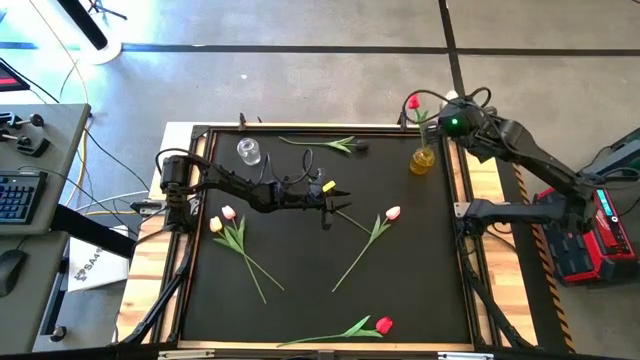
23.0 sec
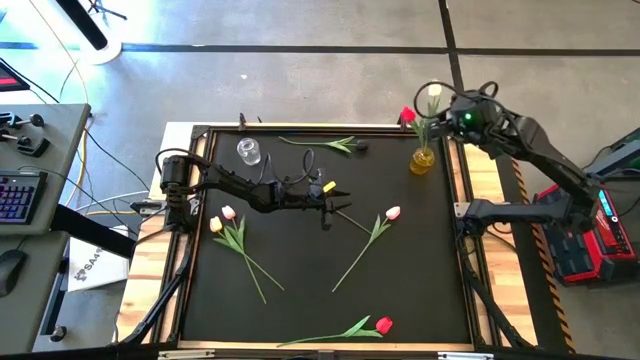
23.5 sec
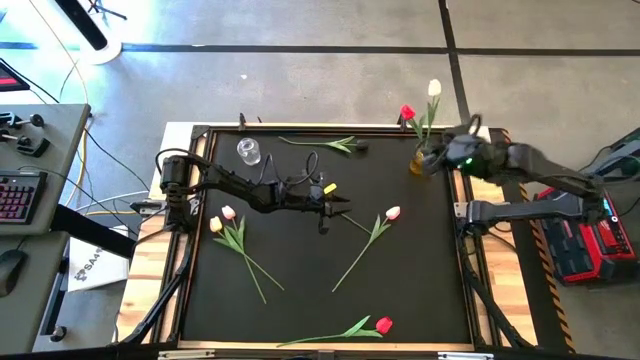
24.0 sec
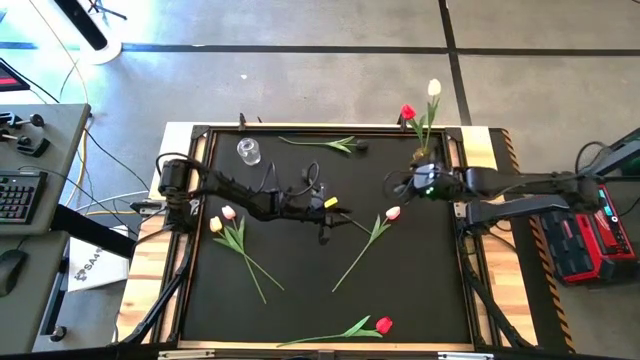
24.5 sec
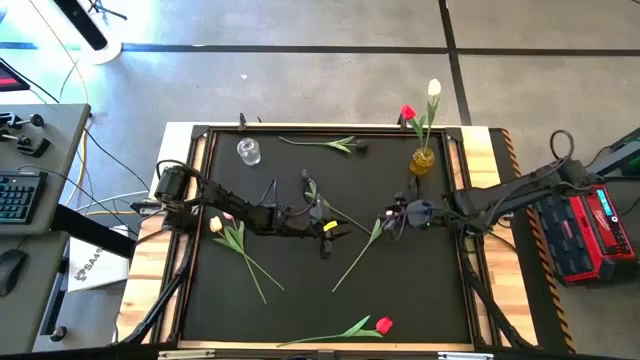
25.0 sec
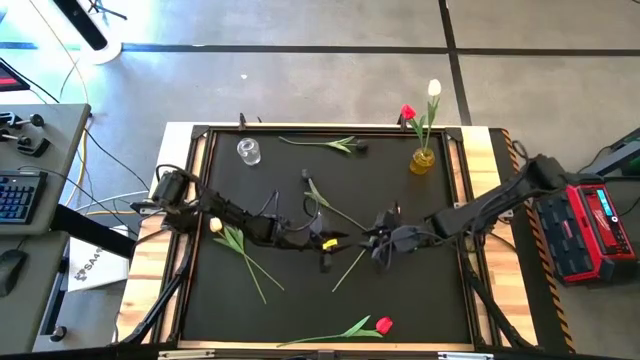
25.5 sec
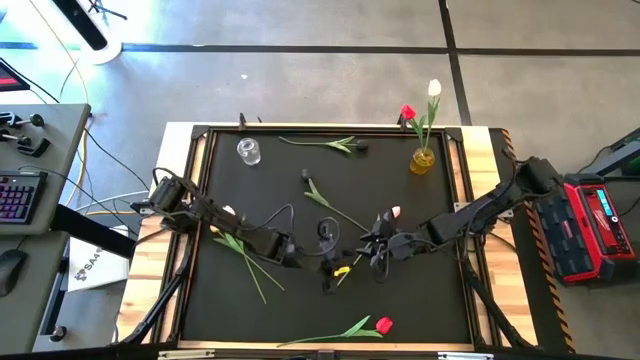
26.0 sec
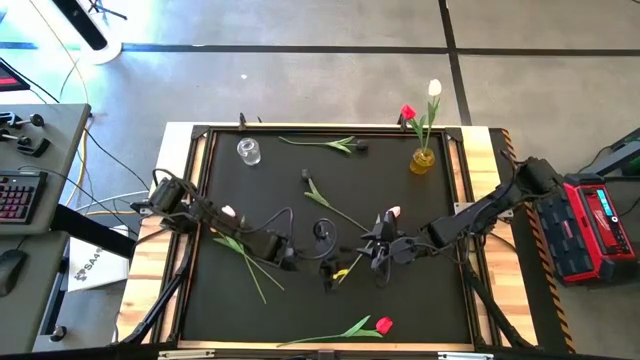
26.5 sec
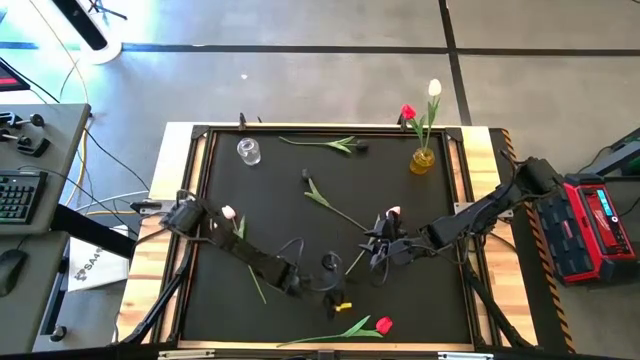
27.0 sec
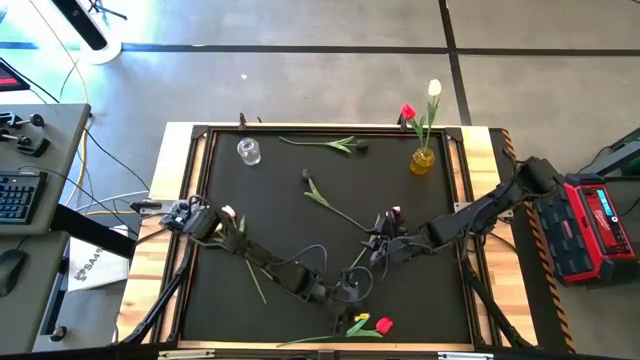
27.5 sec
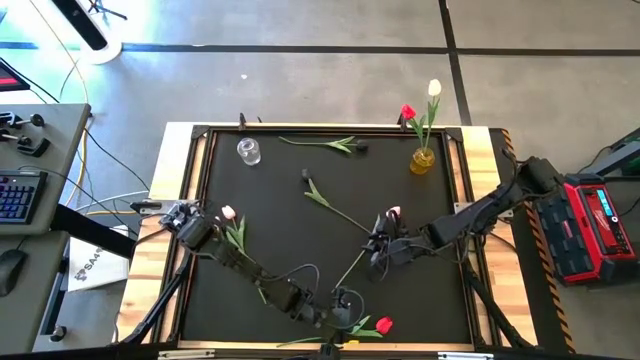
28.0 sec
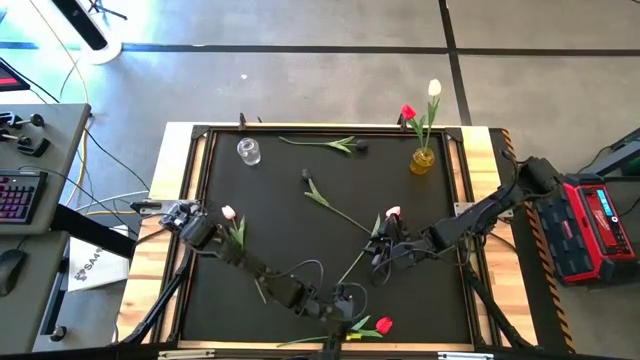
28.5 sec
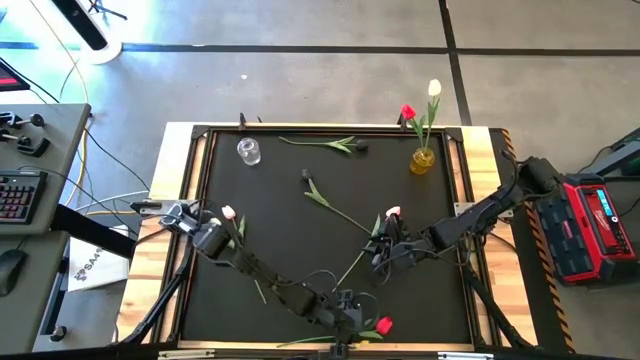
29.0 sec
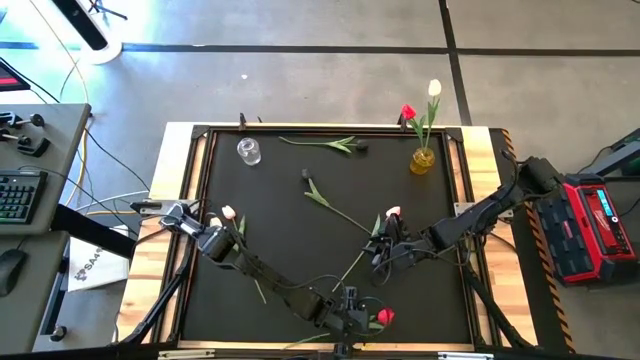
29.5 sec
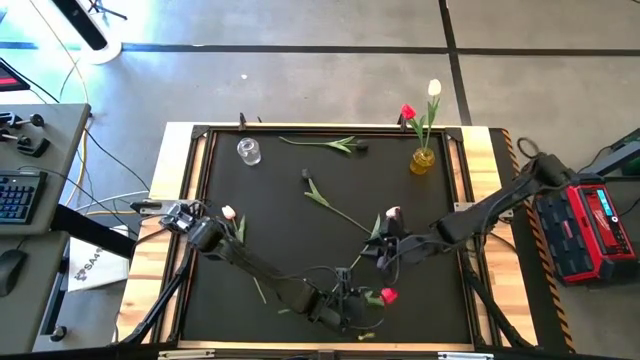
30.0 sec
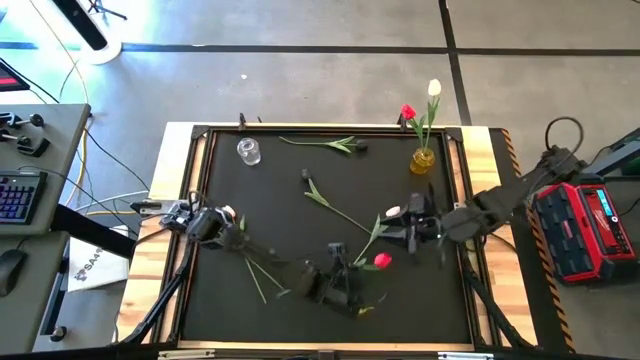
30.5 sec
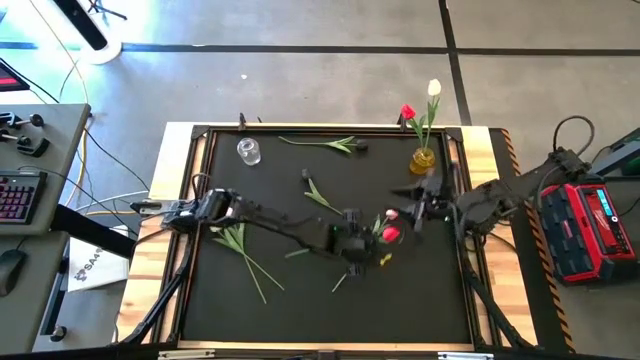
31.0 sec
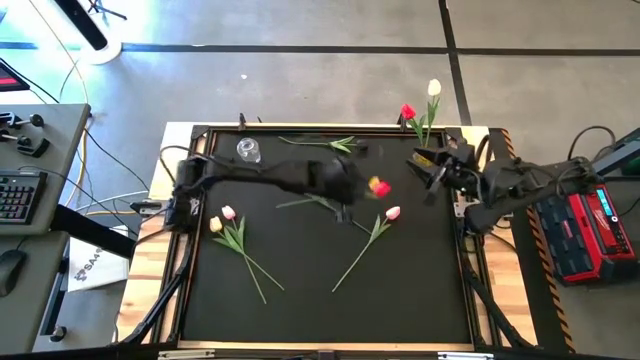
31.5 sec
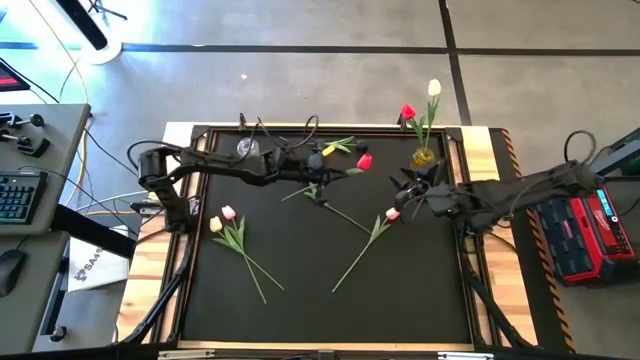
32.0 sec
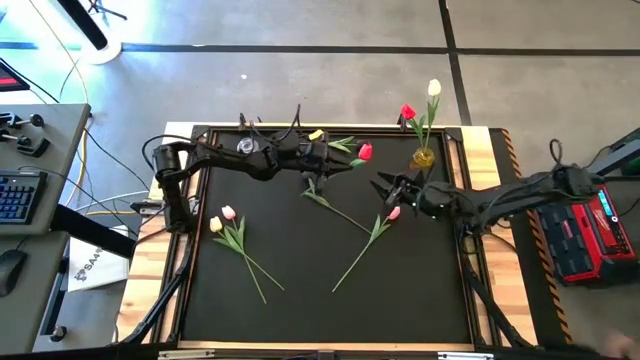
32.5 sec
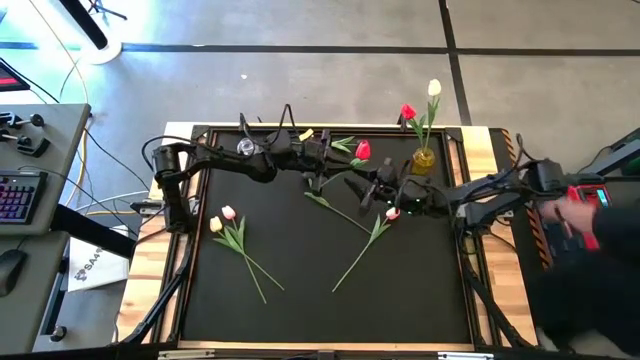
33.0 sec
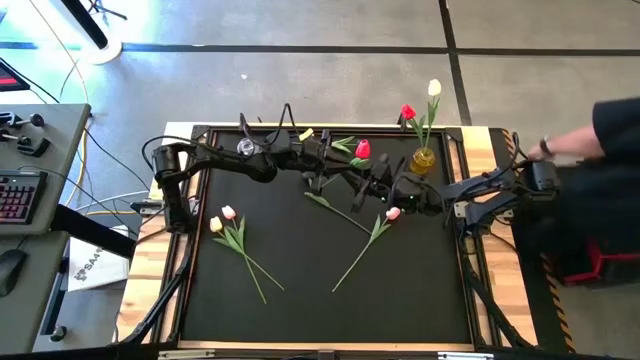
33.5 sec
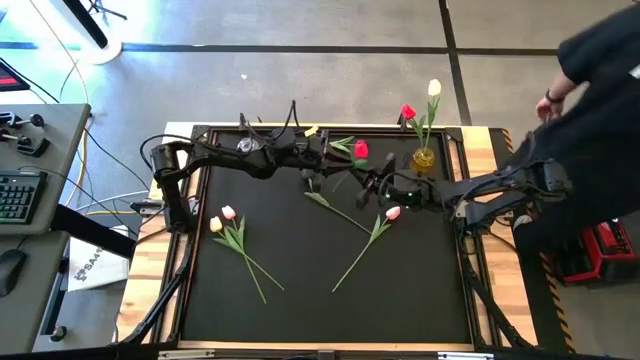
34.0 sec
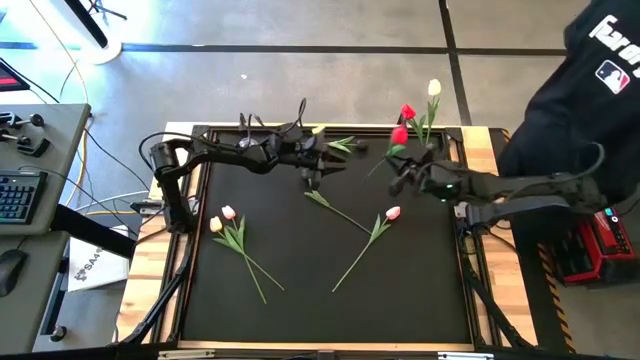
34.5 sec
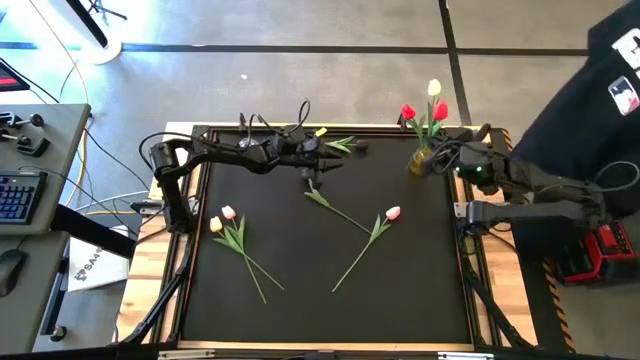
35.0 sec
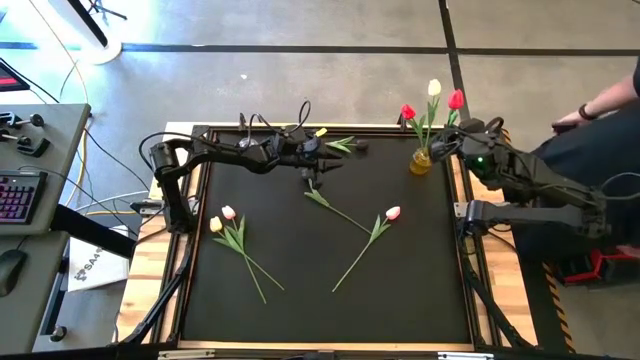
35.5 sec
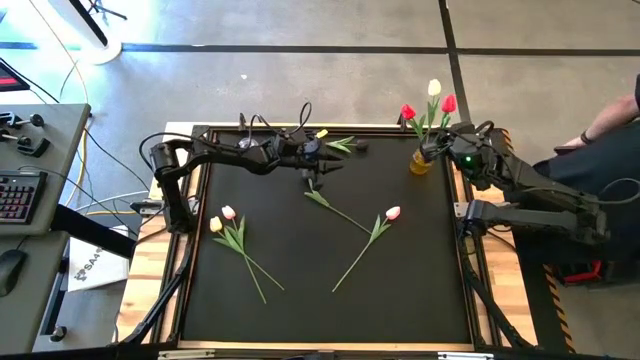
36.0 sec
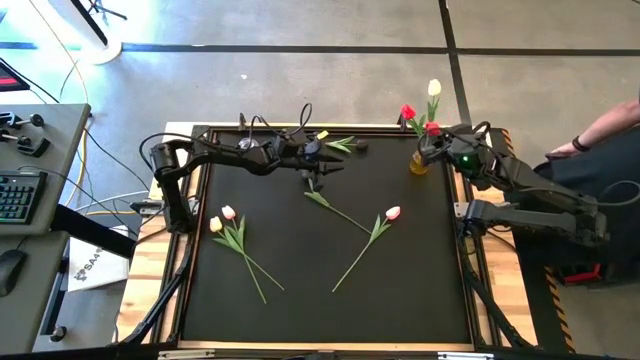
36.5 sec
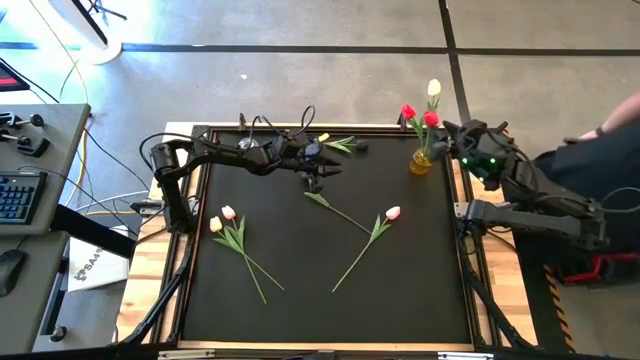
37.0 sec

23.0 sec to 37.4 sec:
Task: Sort flowers into vase by color
Put the red flower into the yellow flower vase

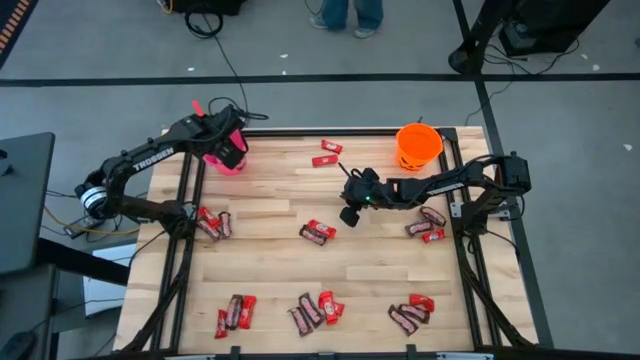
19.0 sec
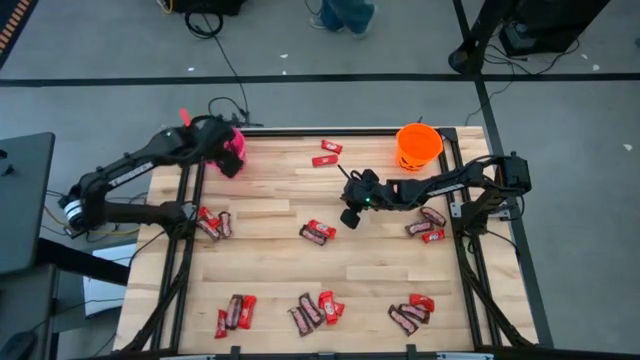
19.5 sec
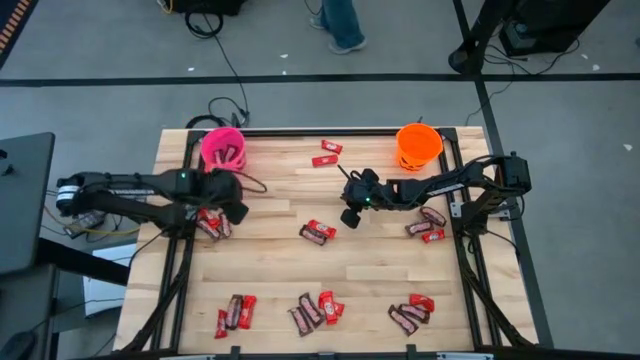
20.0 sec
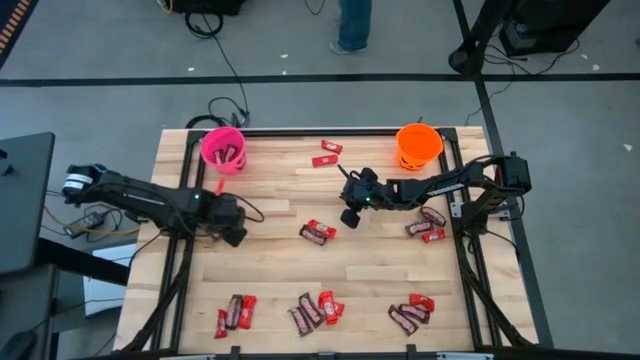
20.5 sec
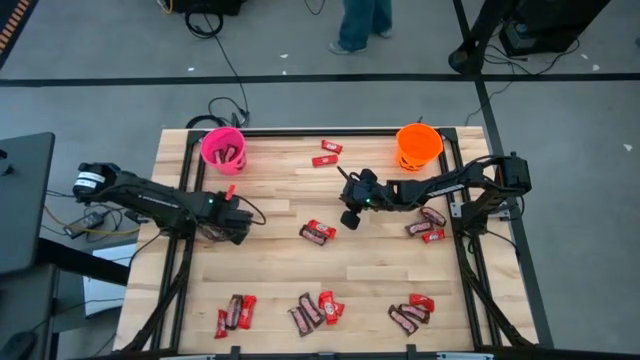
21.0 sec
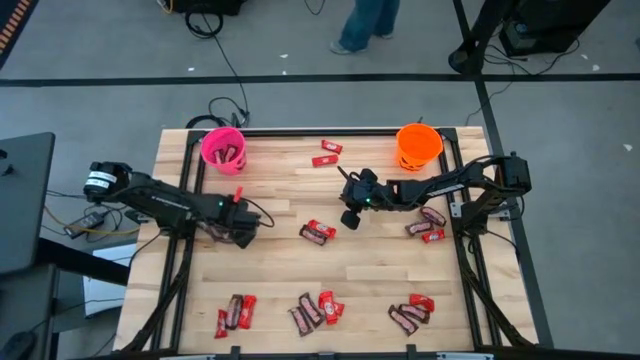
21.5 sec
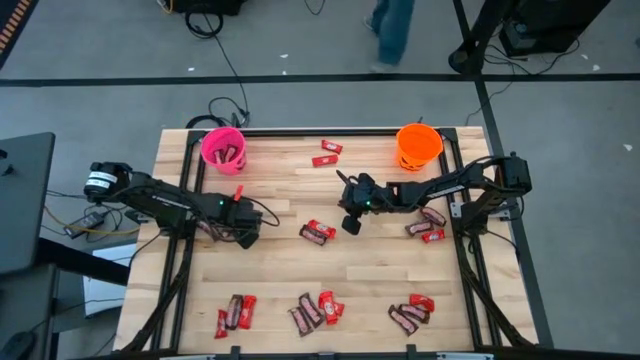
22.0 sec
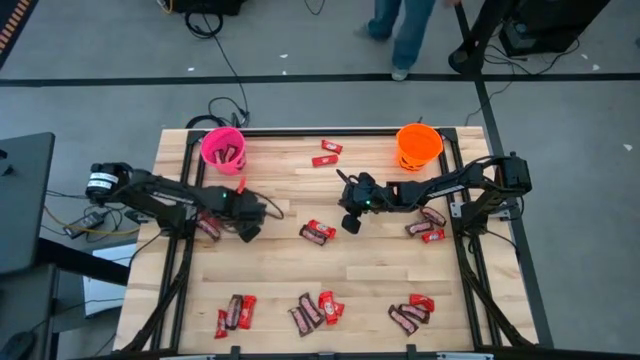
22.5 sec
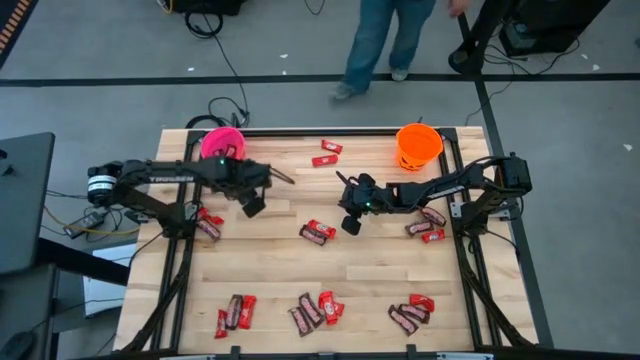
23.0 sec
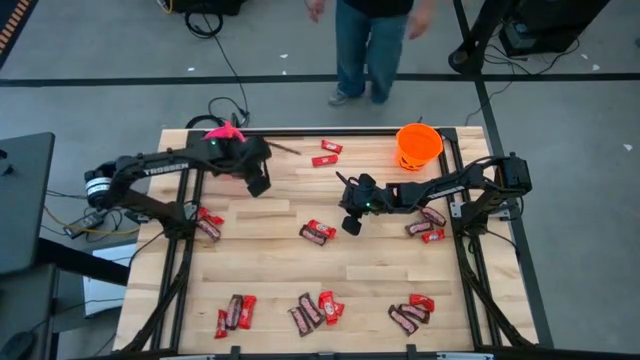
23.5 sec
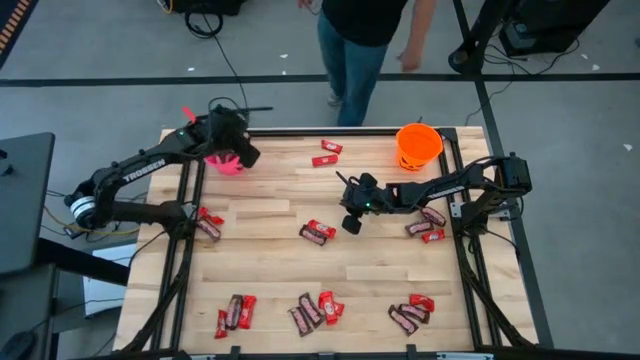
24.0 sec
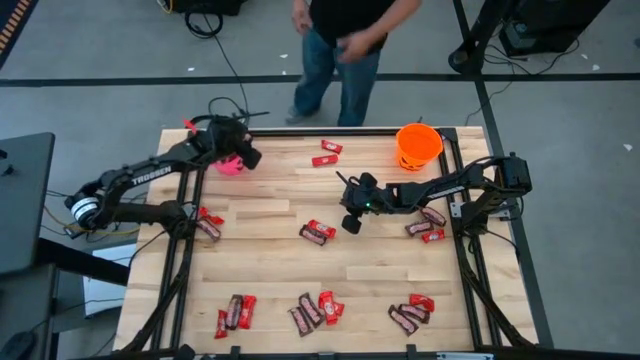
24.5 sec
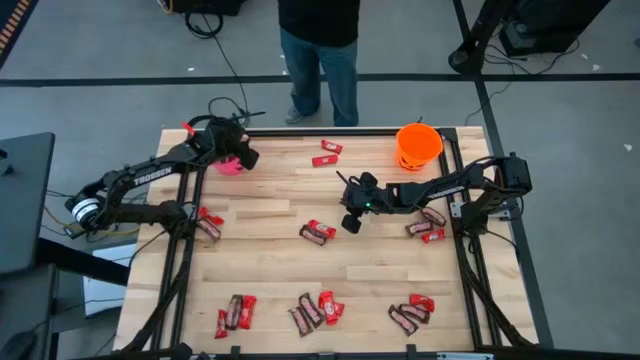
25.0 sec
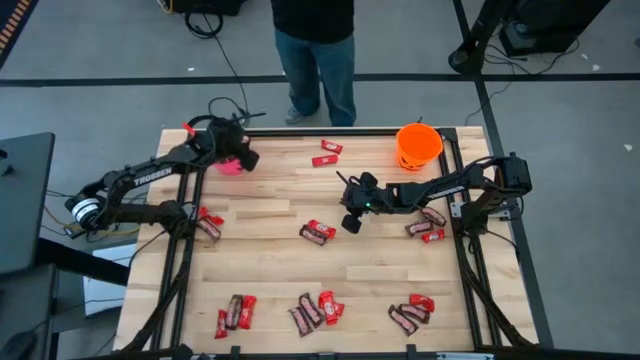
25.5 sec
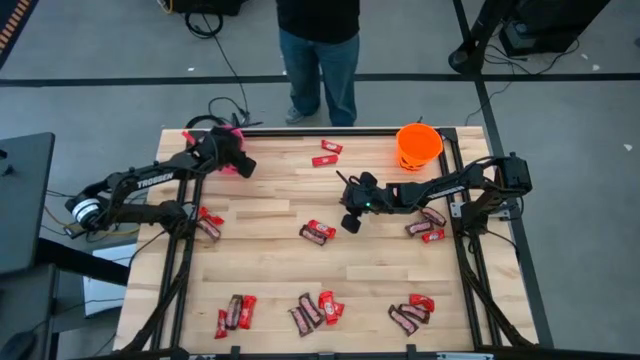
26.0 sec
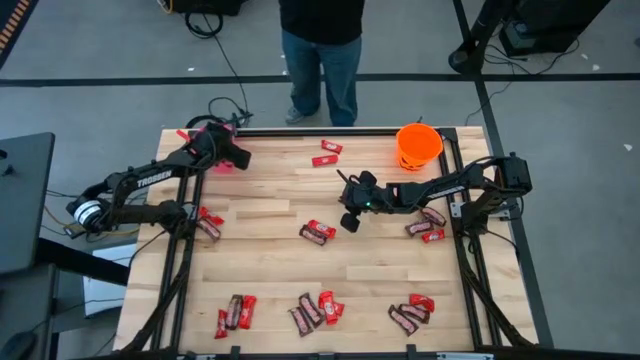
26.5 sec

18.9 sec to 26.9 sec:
Task: Sort candy by brand, put in halloween buckets
Put the brown chocolate bar into the pink bucket
